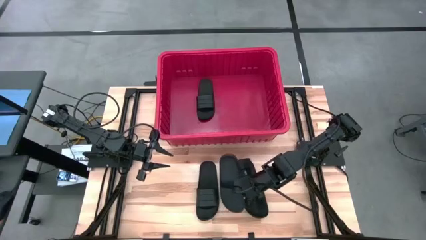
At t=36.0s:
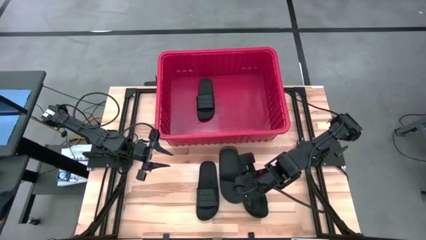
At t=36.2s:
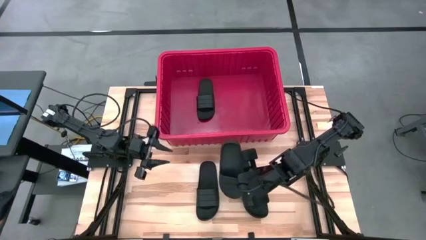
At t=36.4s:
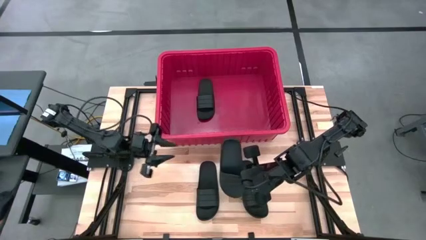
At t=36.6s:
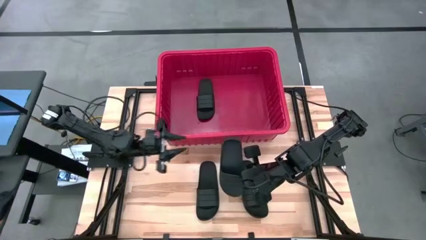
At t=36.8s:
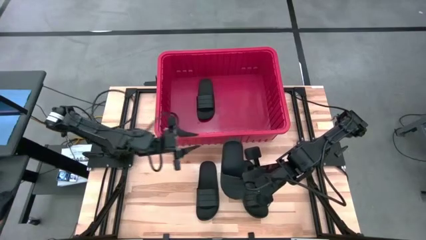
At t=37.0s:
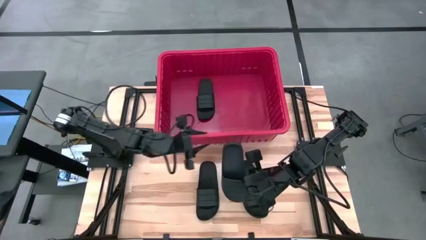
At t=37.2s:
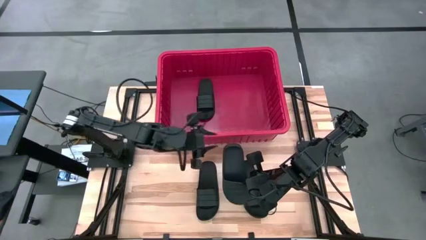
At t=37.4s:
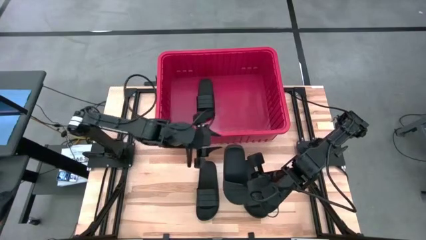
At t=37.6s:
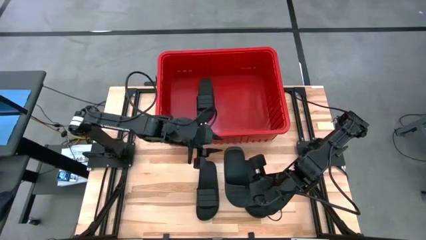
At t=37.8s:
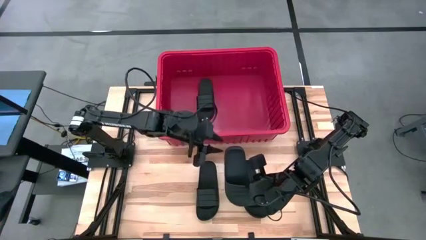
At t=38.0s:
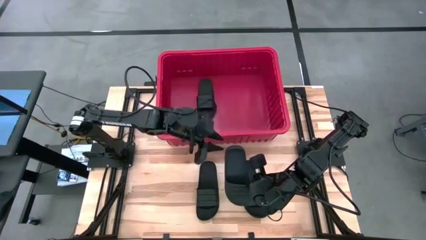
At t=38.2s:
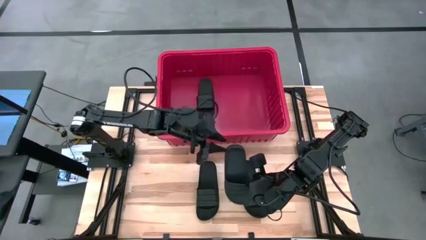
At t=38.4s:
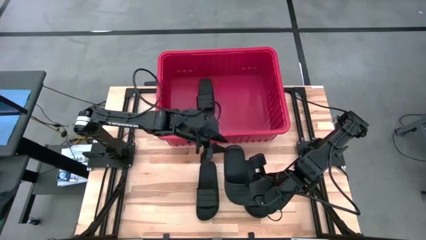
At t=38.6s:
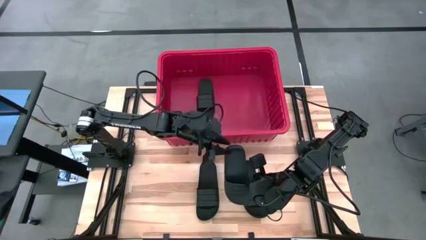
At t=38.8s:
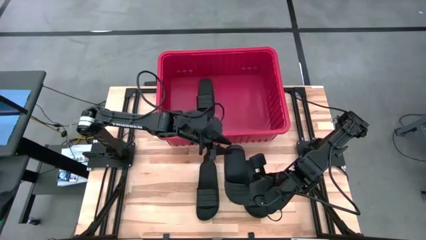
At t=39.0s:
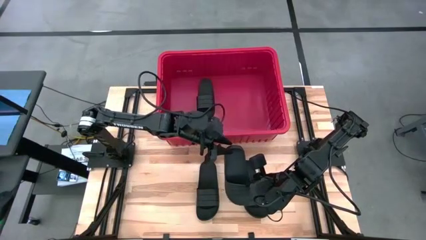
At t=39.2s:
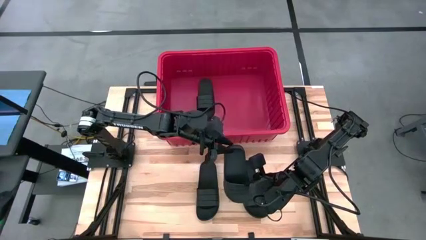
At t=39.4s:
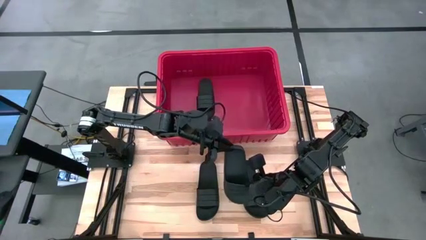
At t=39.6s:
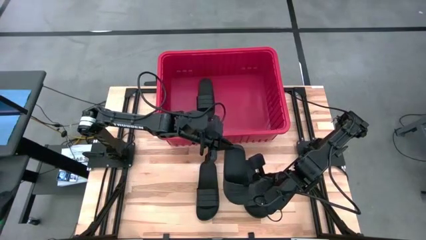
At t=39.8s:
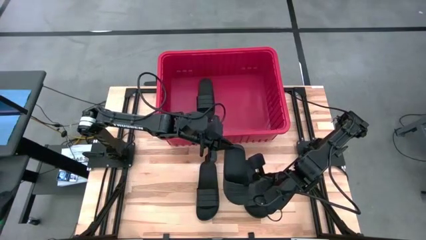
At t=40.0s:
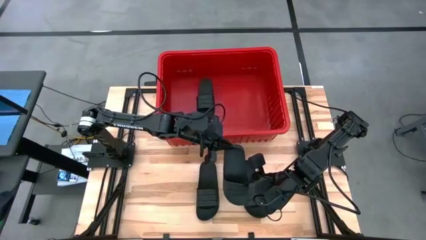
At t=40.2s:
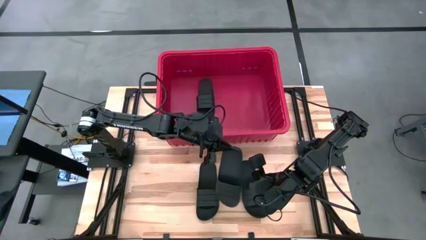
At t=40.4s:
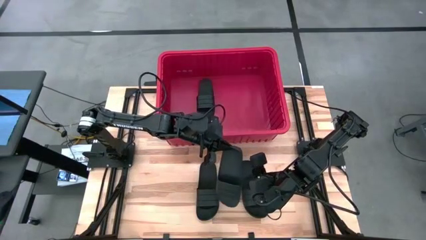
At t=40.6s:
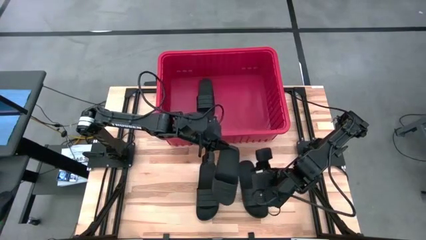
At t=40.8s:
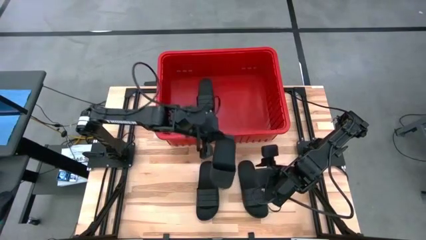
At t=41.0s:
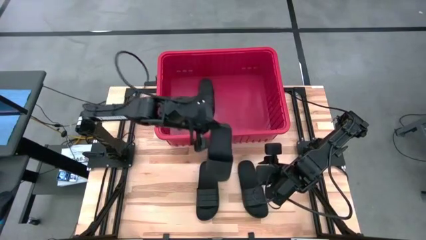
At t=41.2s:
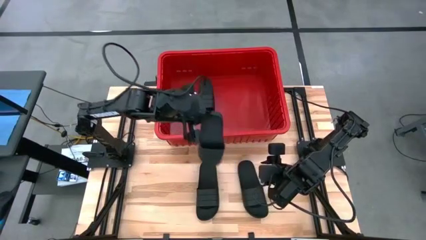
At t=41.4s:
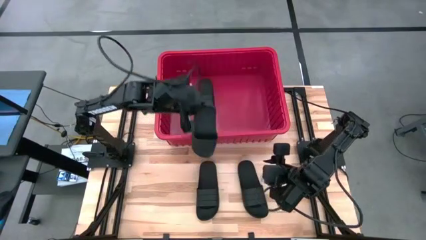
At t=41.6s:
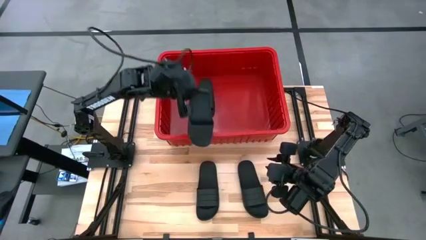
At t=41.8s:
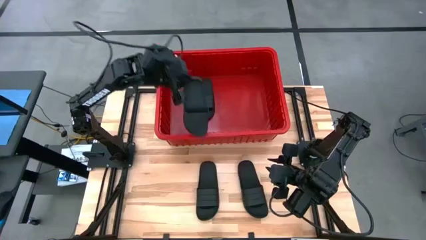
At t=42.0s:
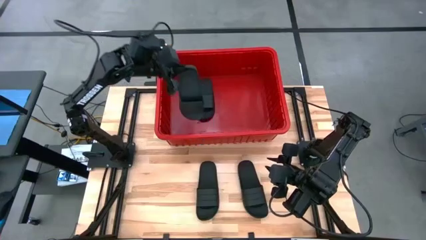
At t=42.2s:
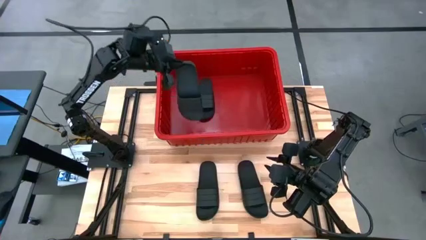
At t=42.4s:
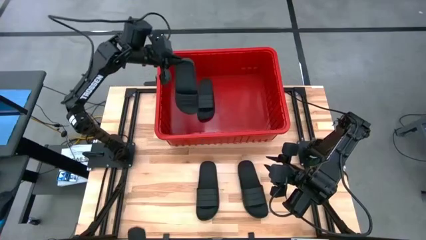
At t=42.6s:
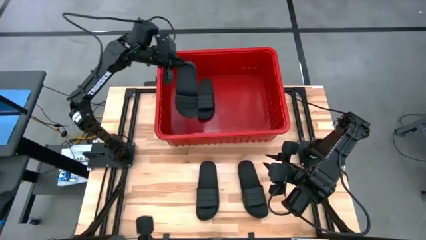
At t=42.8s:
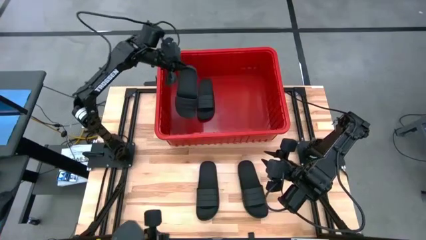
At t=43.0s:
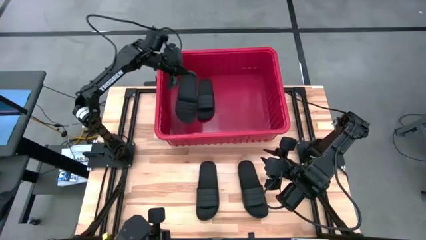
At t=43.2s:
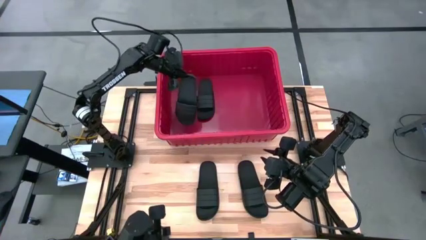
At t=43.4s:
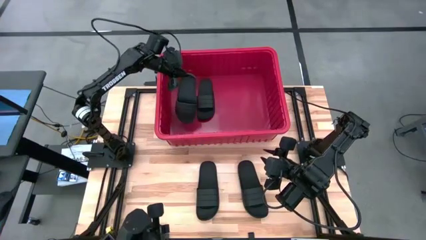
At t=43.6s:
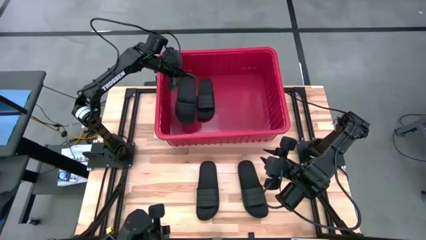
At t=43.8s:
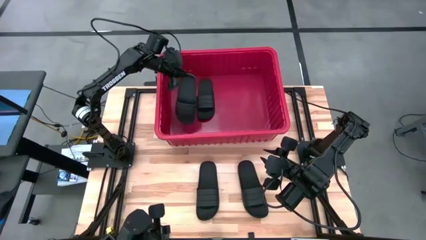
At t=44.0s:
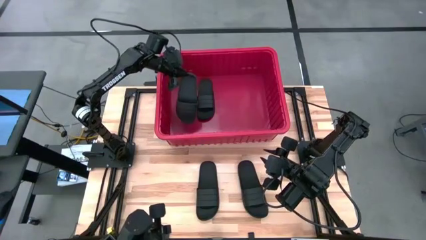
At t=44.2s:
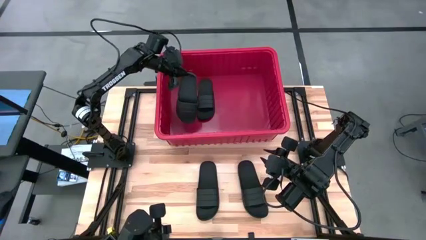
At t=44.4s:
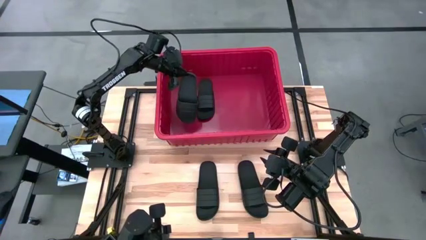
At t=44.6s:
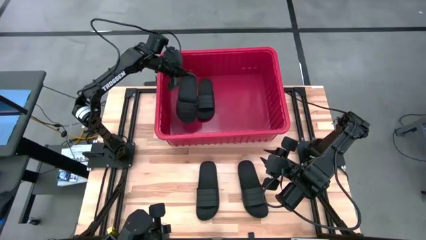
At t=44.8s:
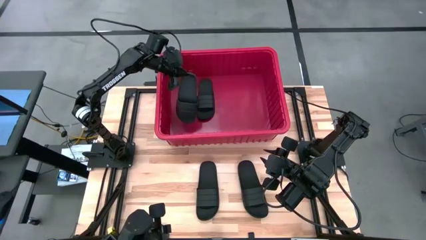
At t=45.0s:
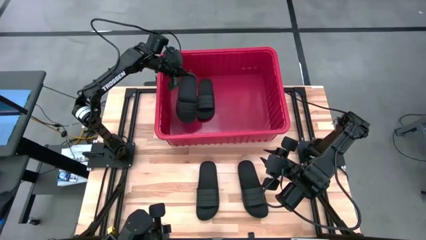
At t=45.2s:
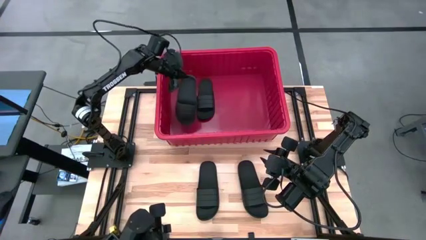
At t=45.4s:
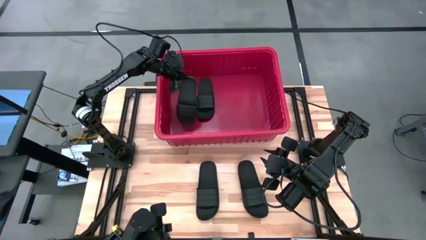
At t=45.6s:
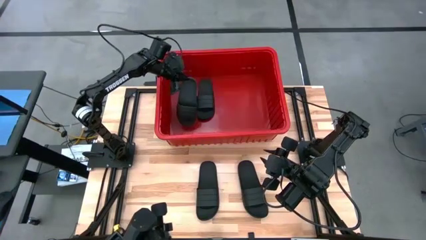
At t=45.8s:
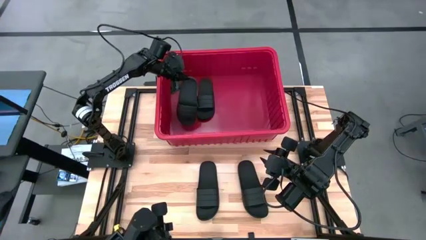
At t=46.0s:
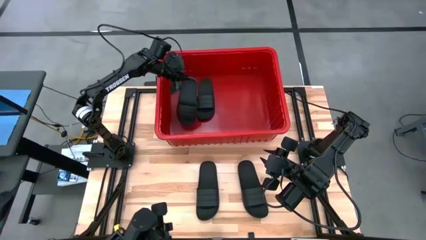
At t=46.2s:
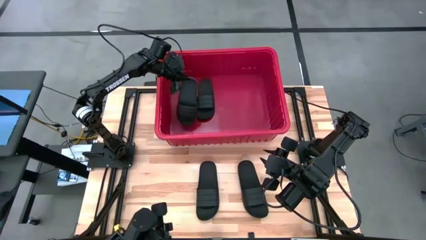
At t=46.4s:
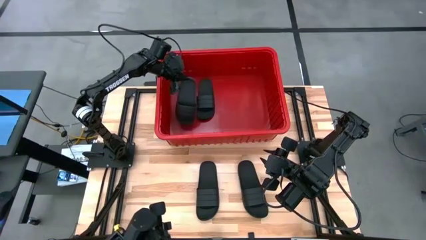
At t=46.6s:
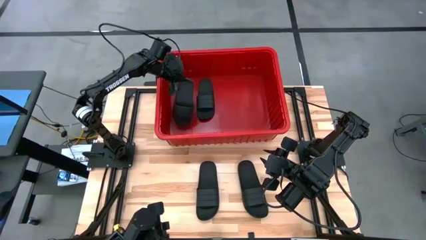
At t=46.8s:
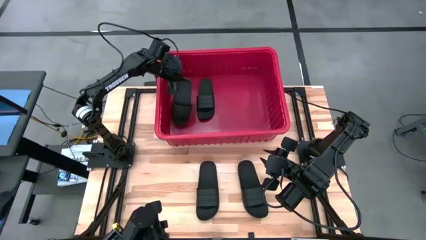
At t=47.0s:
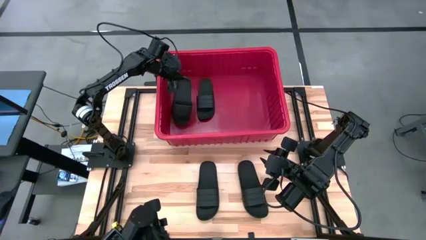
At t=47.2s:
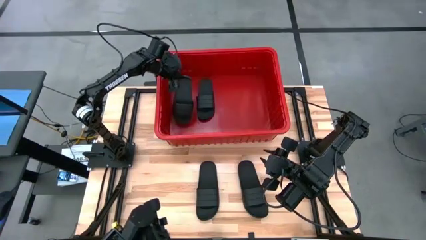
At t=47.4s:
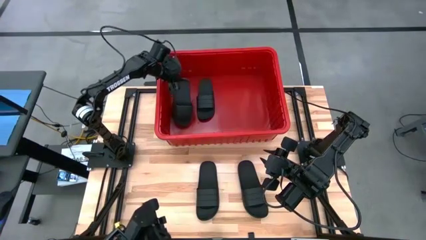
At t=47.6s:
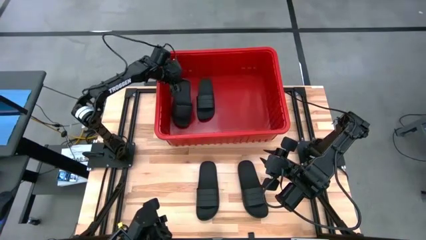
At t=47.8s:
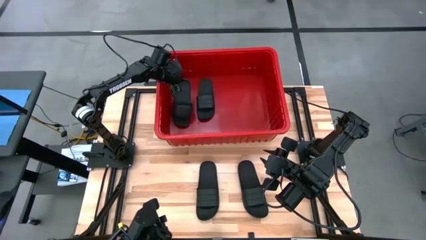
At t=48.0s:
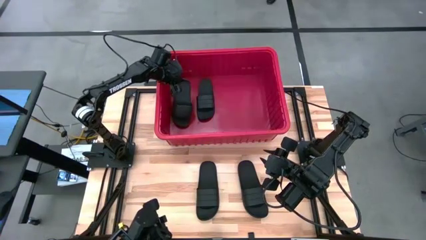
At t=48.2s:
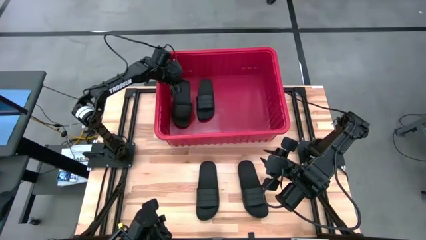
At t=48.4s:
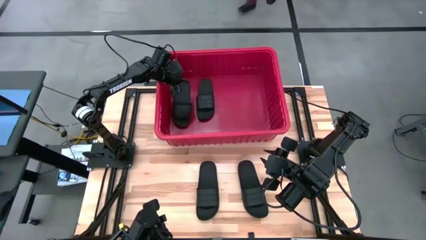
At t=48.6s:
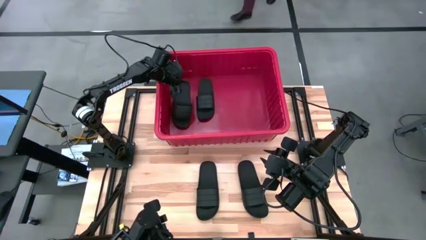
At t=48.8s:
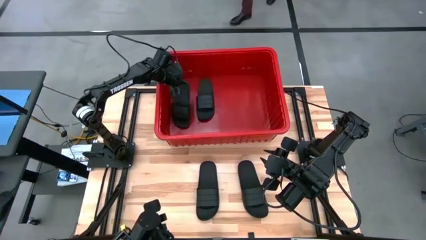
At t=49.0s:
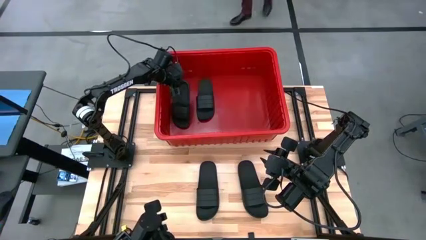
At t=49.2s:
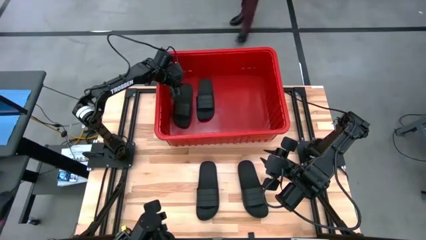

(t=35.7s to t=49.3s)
Task: Pick and place slides into bin
Put the center slide into the bin
